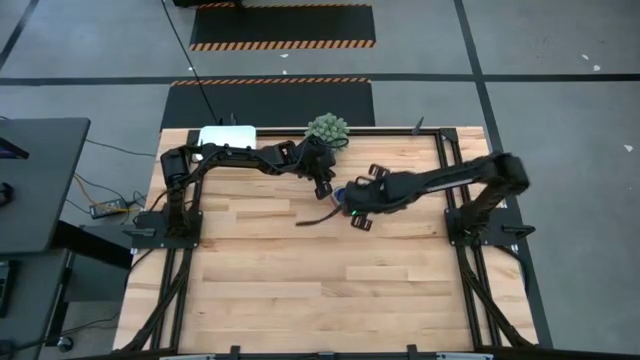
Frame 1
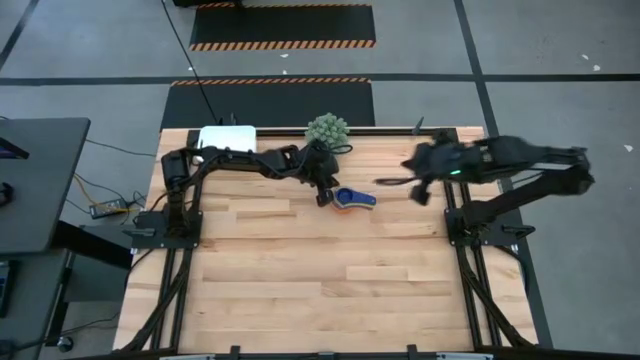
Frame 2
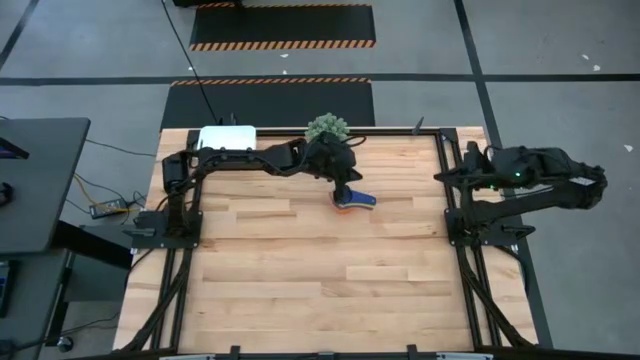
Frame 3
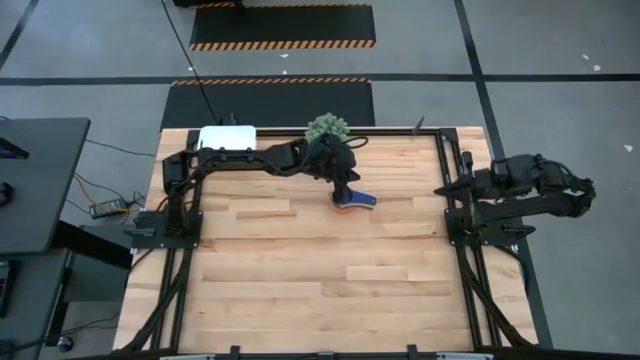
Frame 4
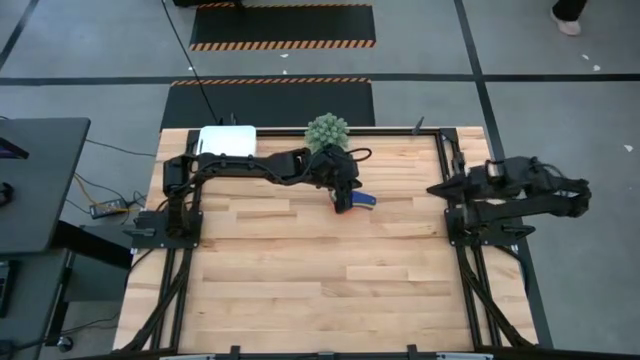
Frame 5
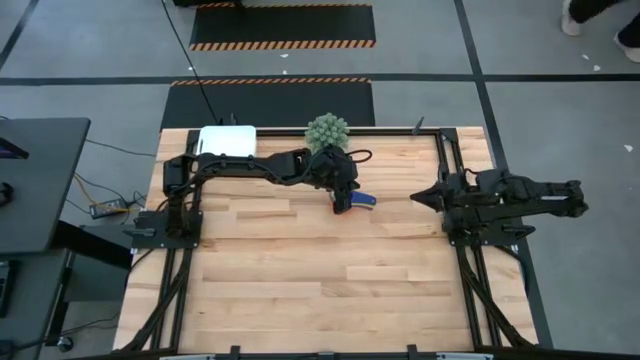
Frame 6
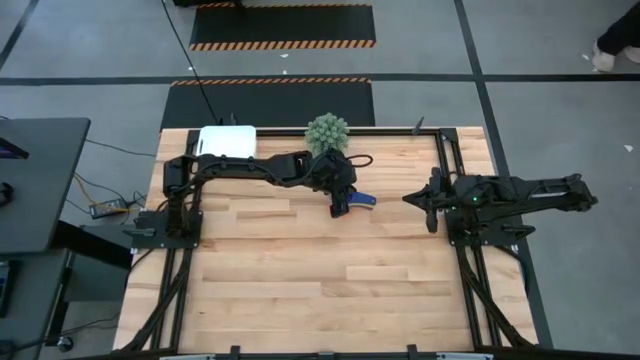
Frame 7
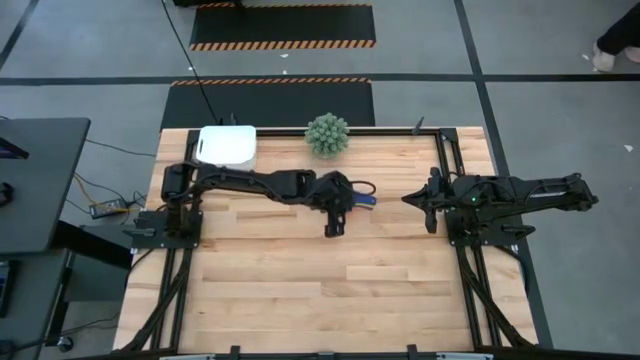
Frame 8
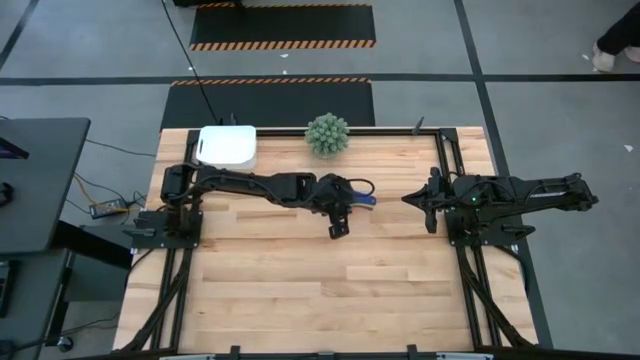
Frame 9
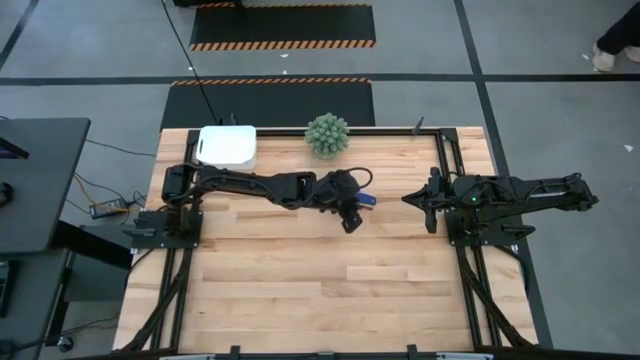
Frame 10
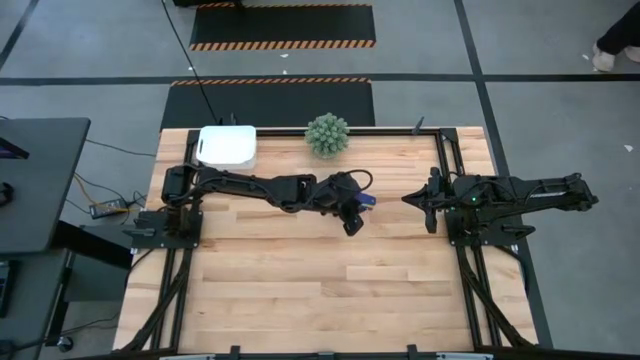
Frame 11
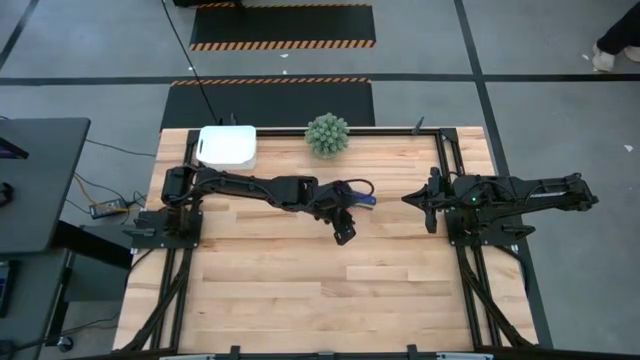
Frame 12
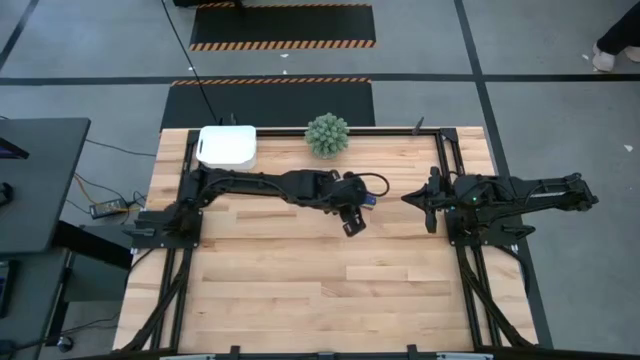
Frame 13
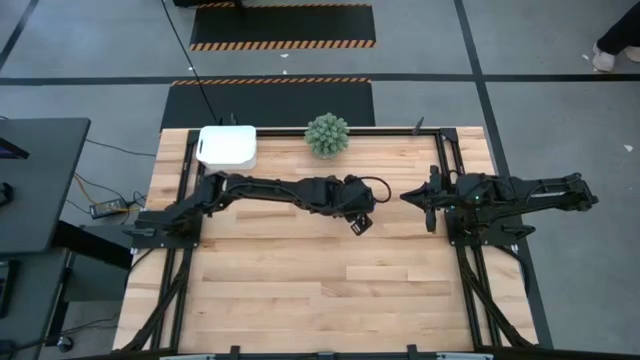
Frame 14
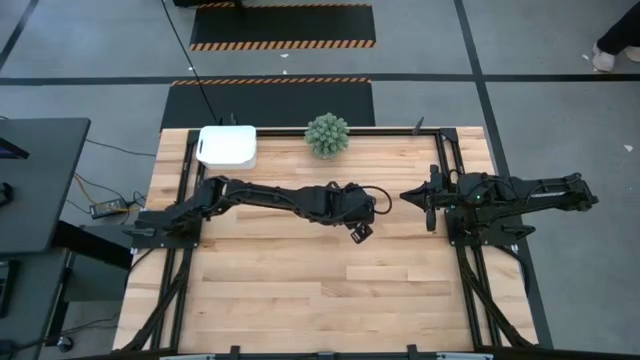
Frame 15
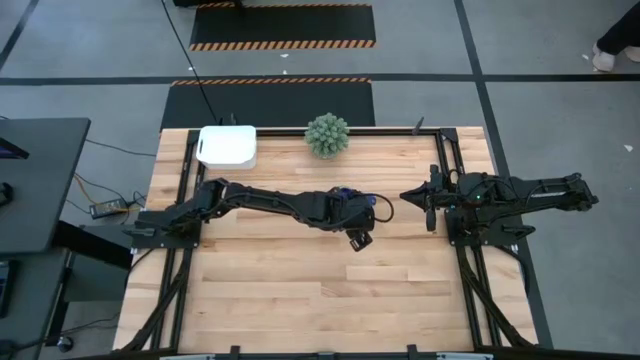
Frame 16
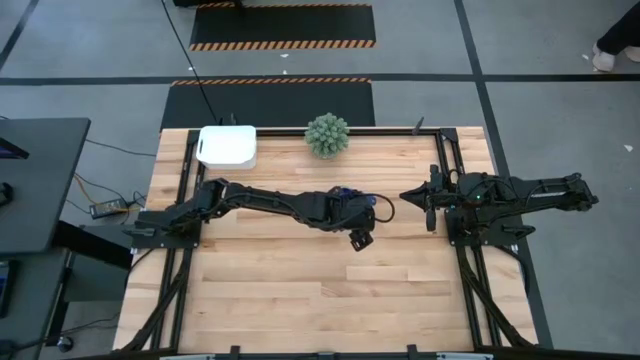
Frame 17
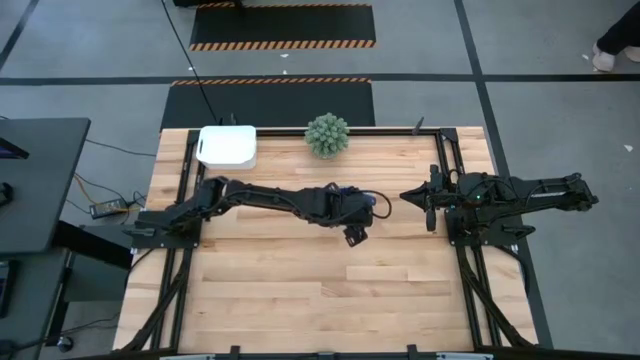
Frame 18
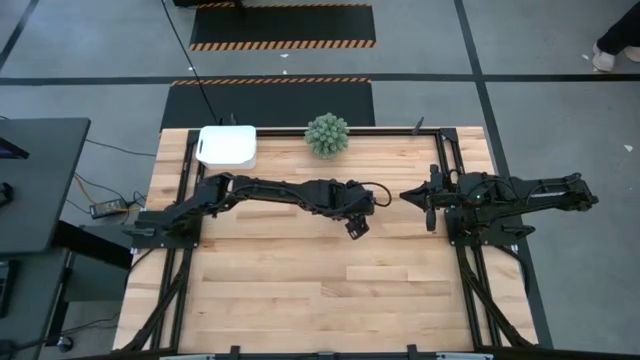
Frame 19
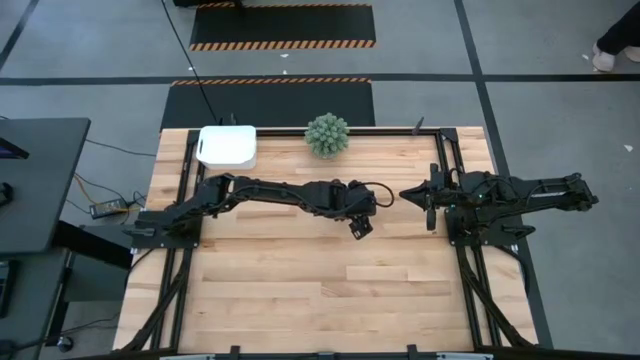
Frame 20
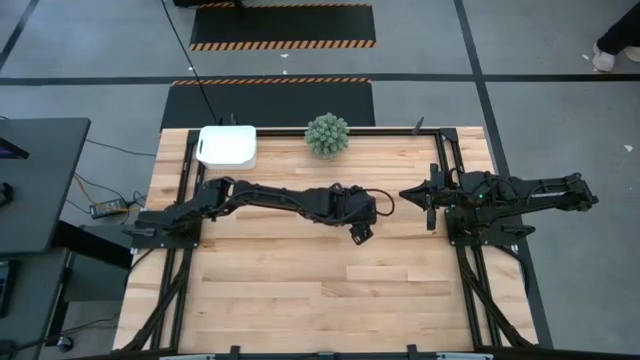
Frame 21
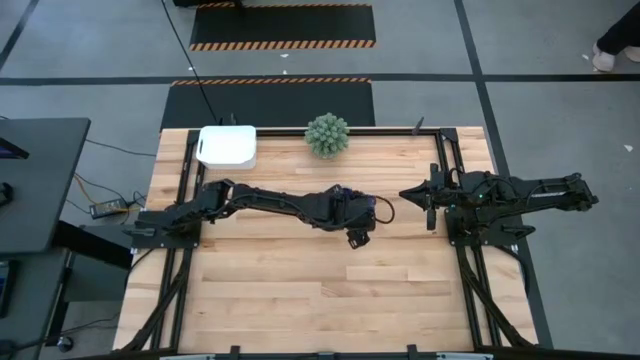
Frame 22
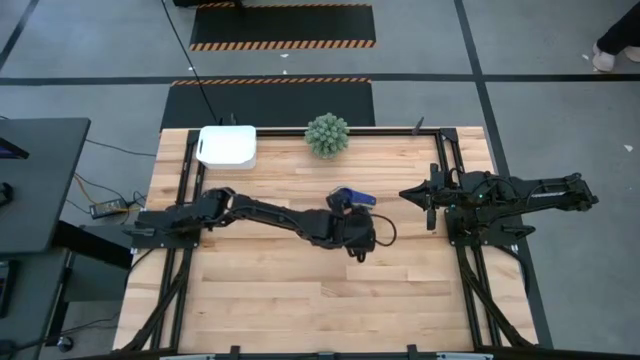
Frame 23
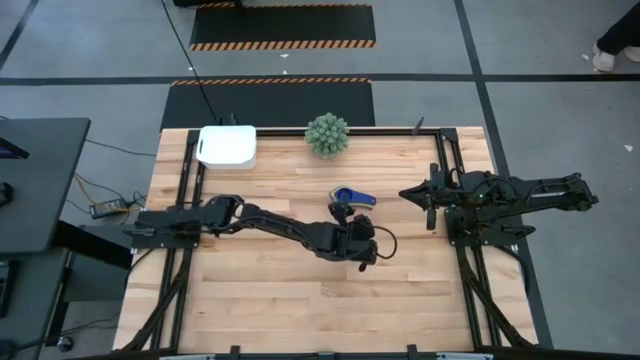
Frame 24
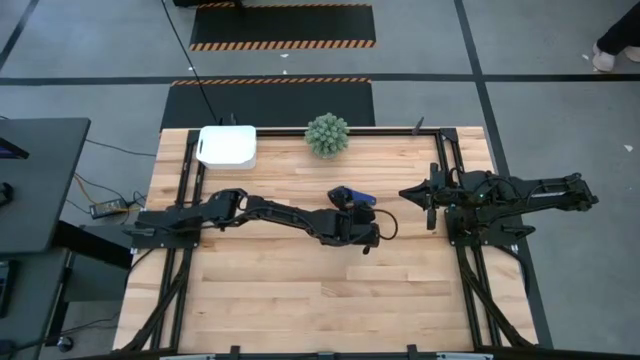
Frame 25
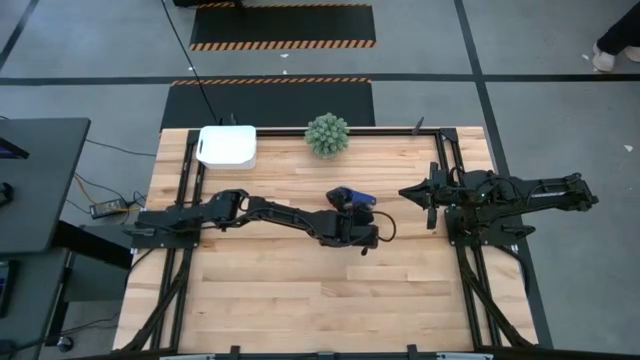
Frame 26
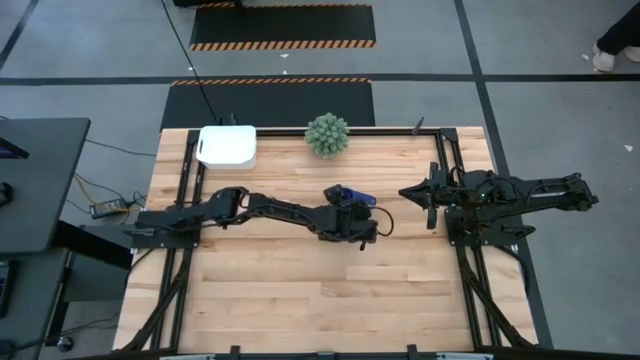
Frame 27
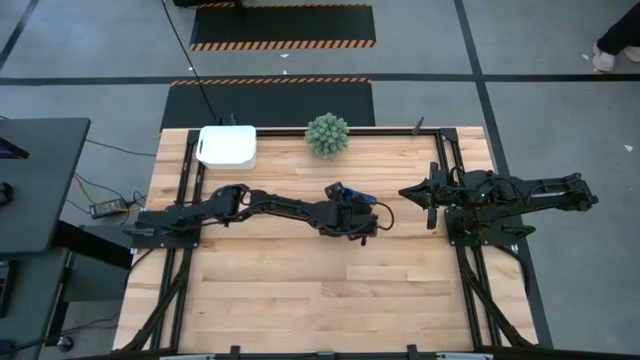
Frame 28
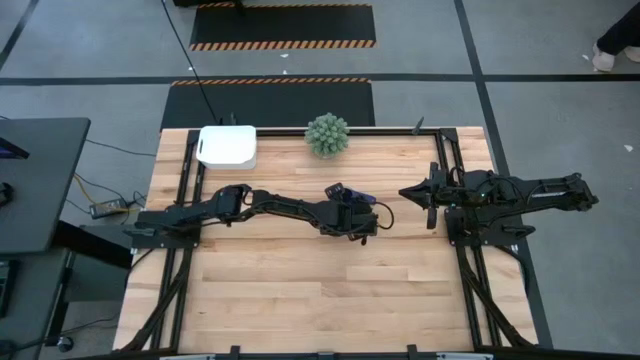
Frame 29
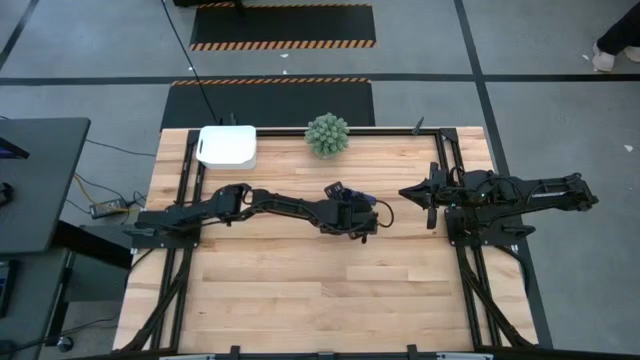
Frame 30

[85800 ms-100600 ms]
Task: Nest measuring cups in basket
Put the nested measuring cups into the white bin

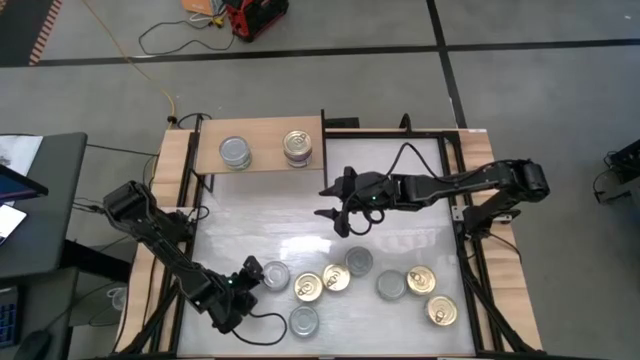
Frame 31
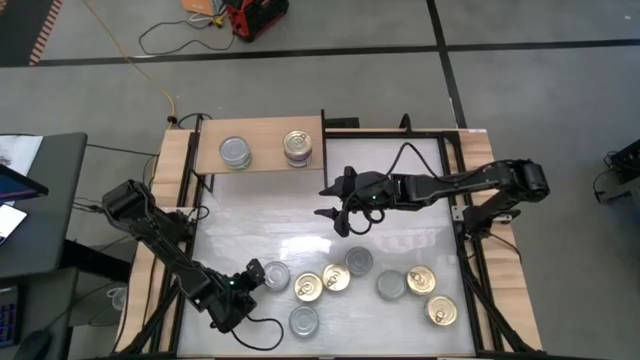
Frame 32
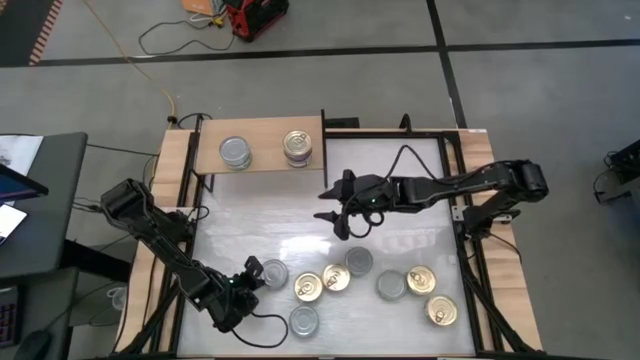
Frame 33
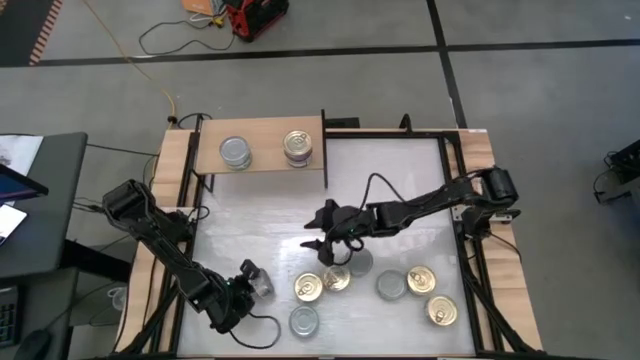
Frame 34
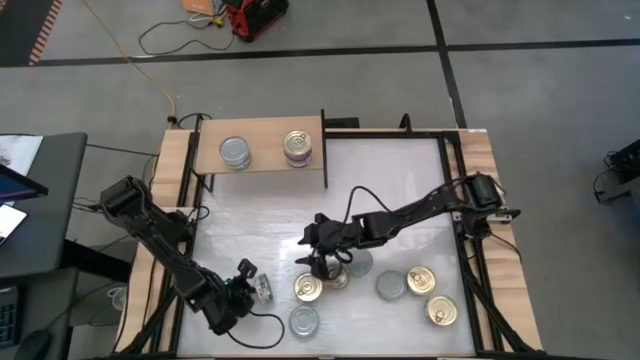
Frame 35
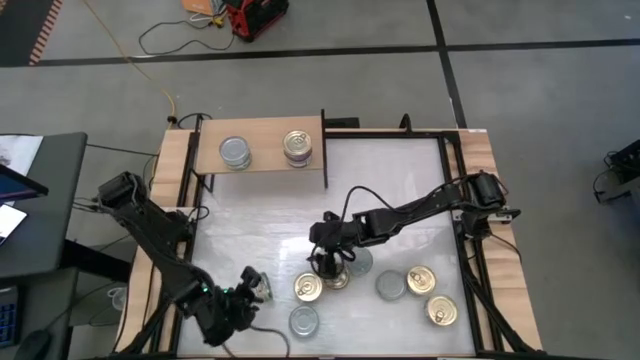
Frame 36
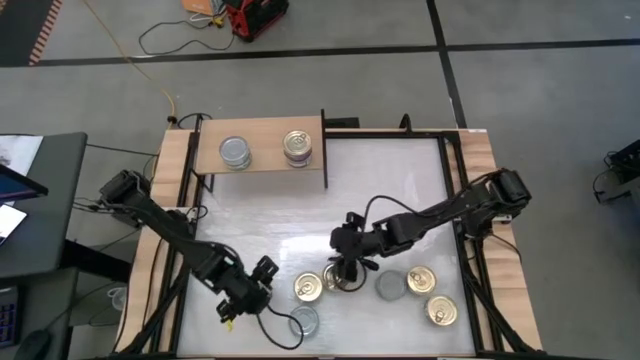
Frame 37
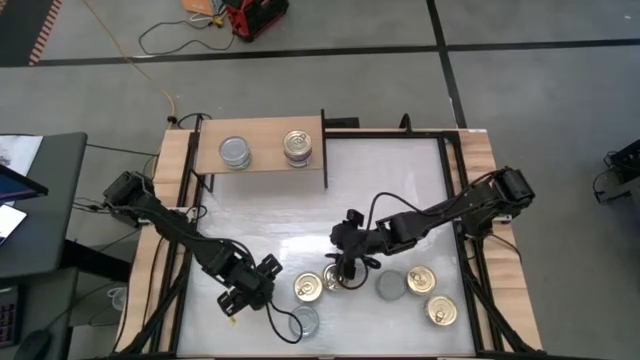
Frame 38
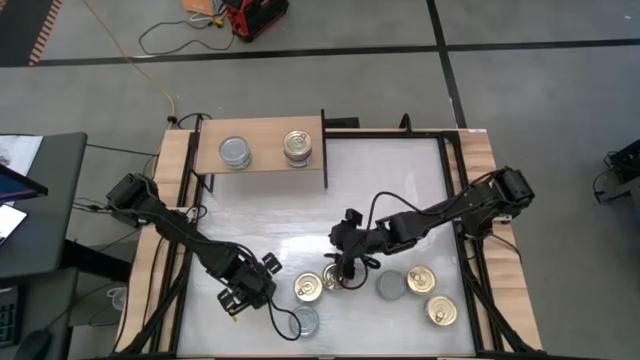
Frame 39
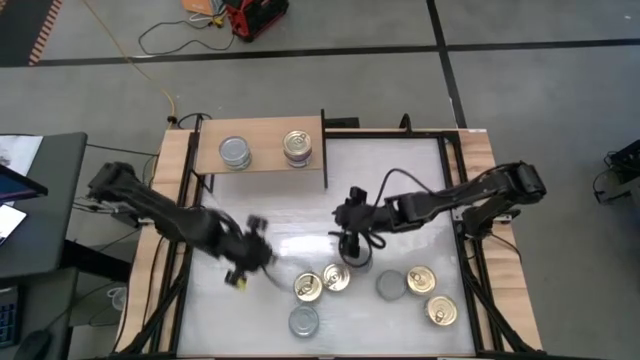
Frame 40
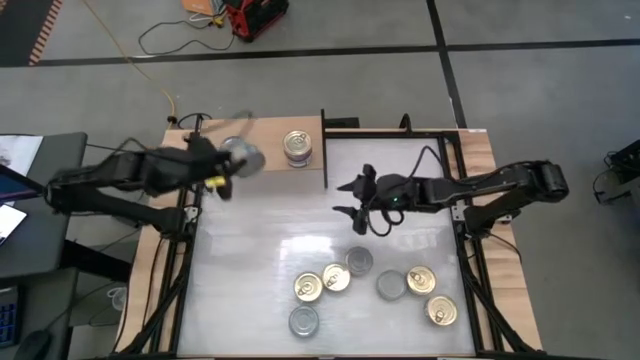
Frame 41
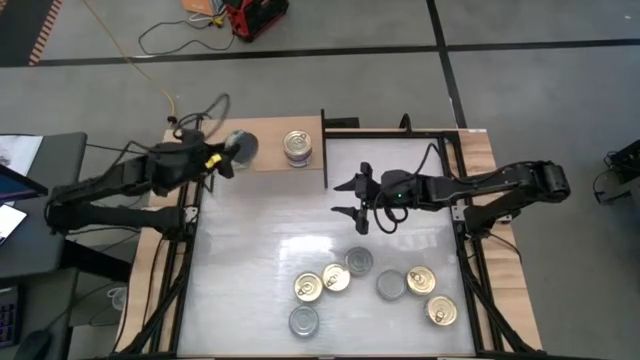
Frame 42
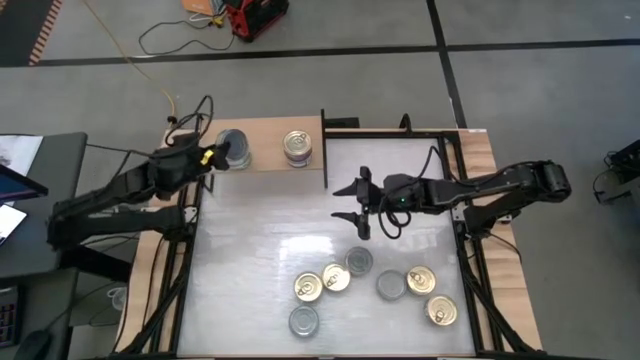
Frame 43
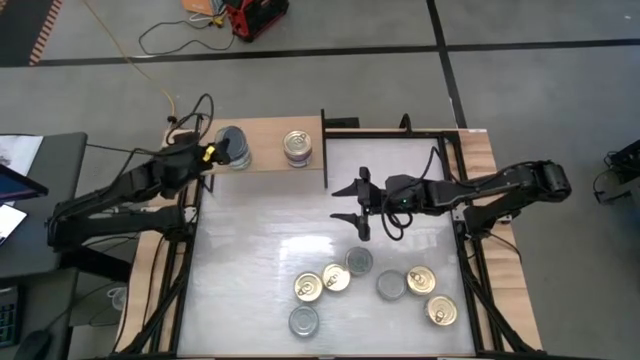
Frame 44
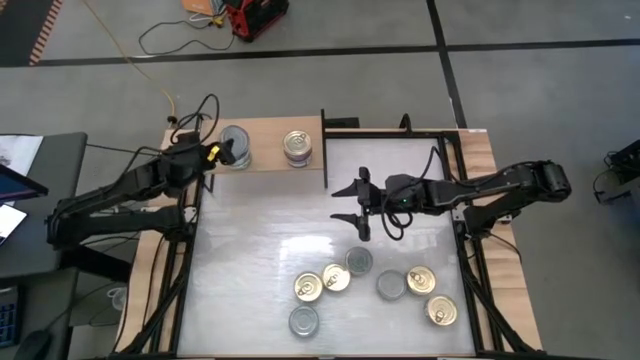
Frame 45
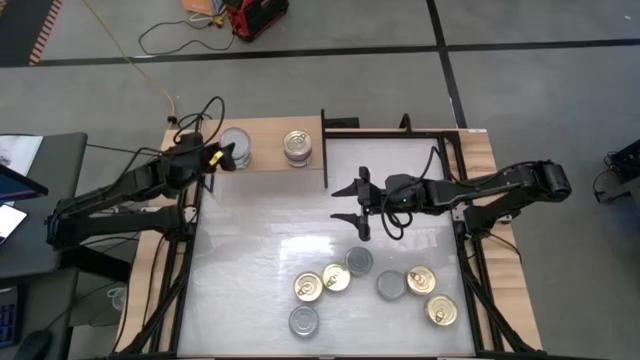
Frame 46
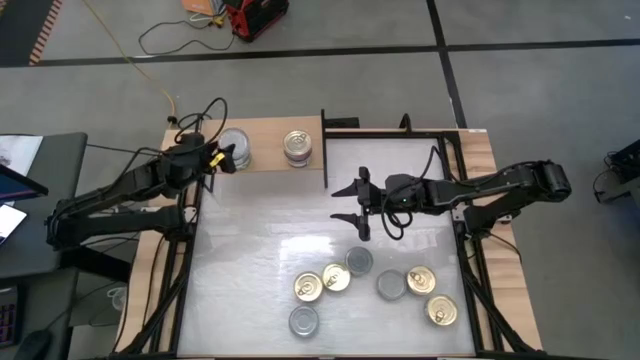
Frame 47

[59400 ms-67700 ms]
Task: Stack canned seafood by type on shelf
Stack the green-white tuna can on top of the other green-white tuna cans on the shelf
